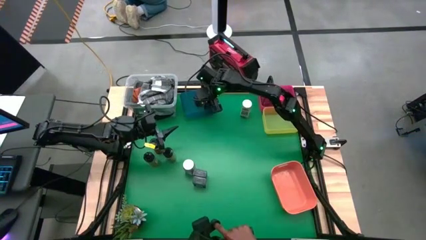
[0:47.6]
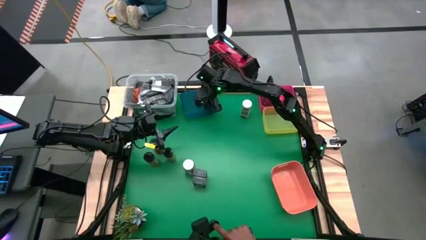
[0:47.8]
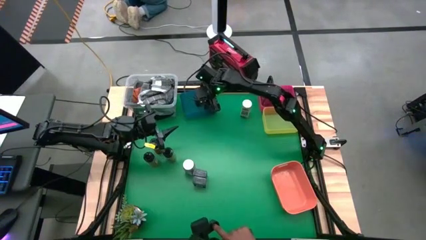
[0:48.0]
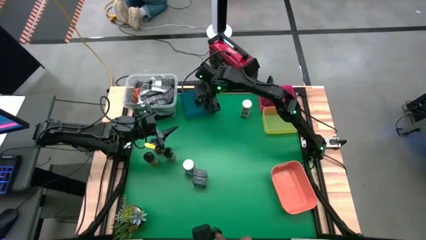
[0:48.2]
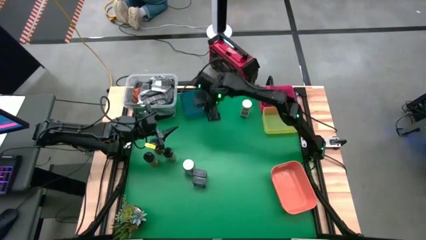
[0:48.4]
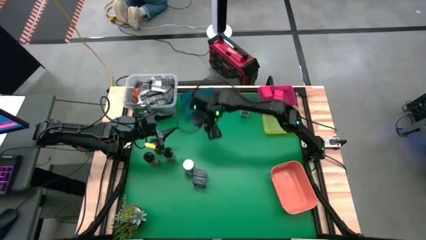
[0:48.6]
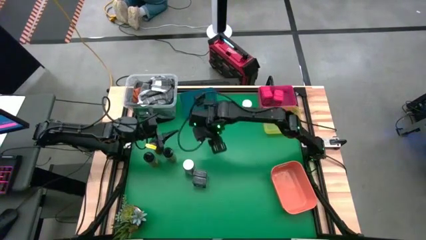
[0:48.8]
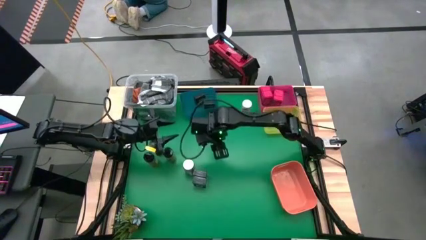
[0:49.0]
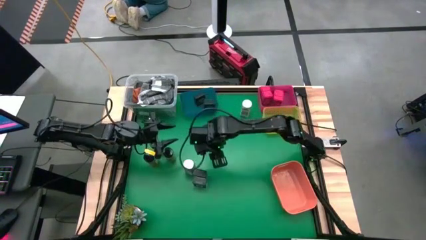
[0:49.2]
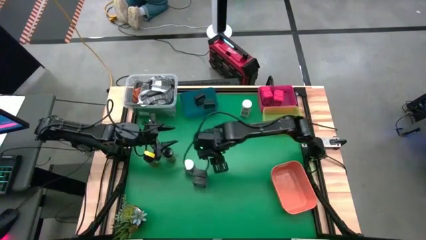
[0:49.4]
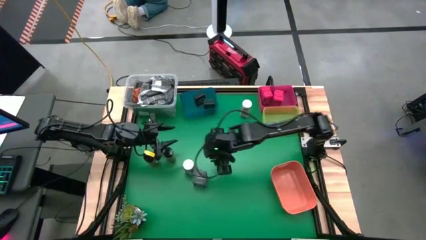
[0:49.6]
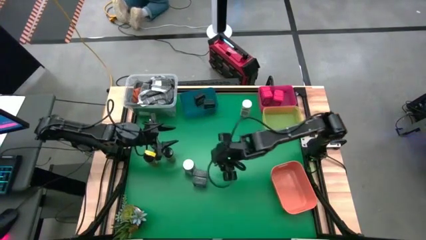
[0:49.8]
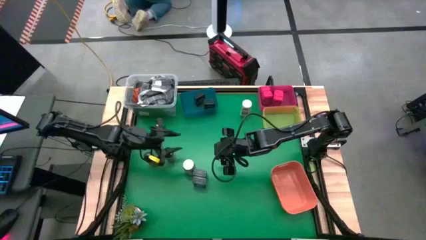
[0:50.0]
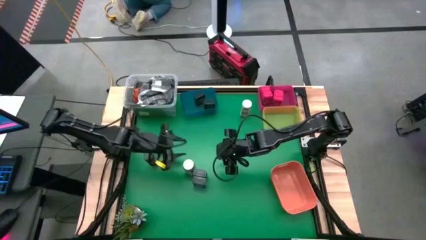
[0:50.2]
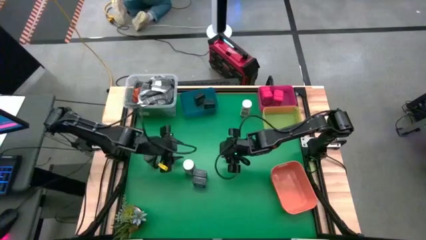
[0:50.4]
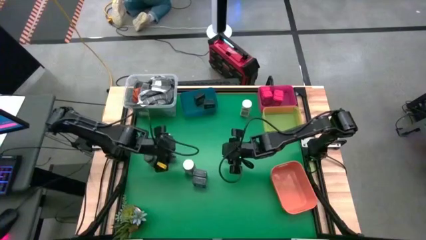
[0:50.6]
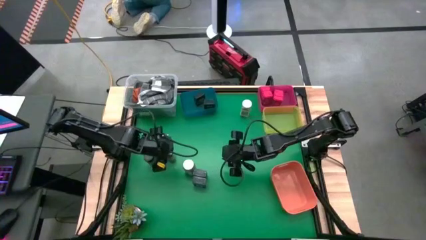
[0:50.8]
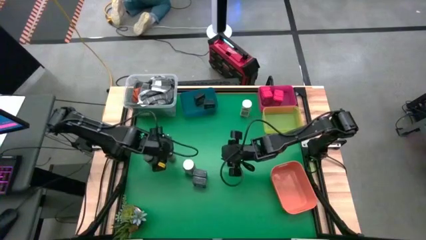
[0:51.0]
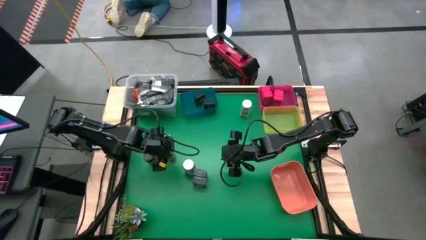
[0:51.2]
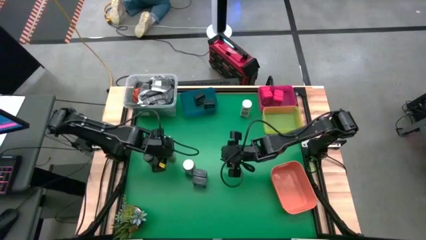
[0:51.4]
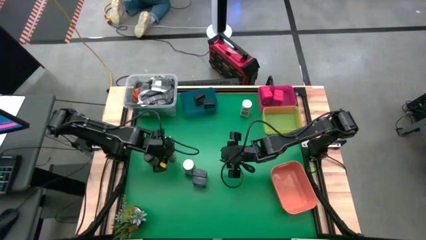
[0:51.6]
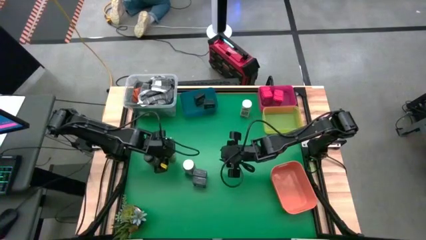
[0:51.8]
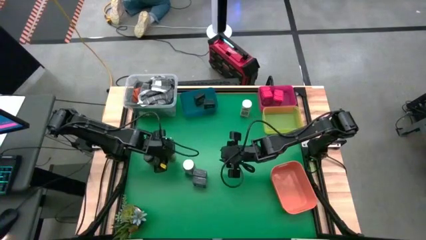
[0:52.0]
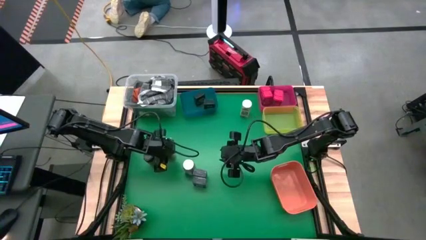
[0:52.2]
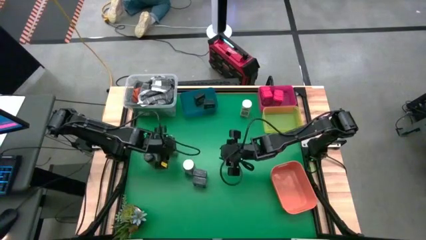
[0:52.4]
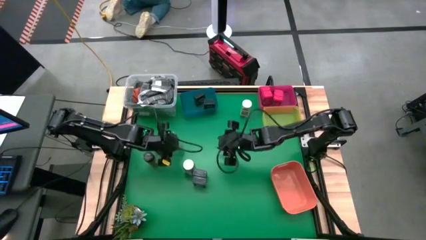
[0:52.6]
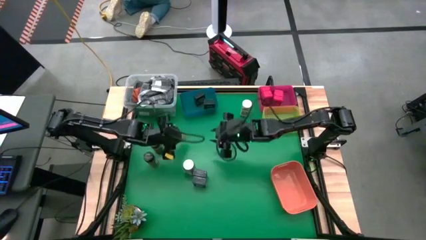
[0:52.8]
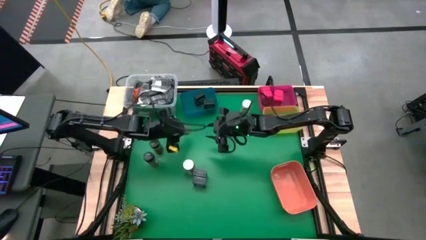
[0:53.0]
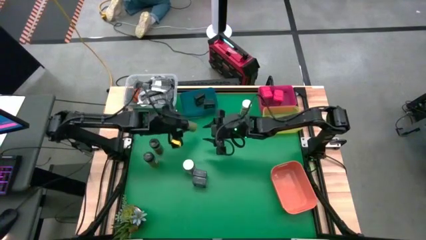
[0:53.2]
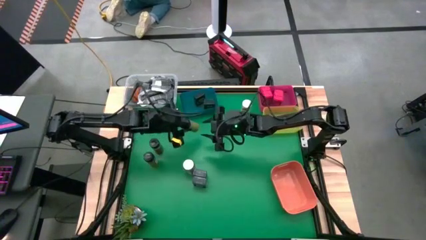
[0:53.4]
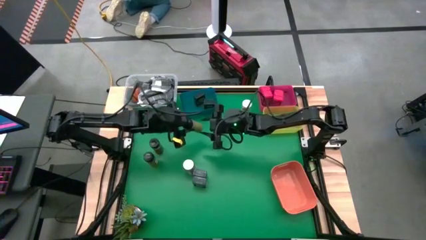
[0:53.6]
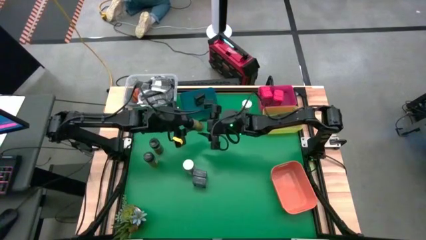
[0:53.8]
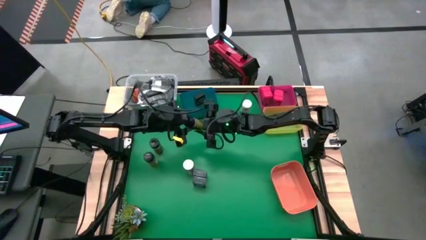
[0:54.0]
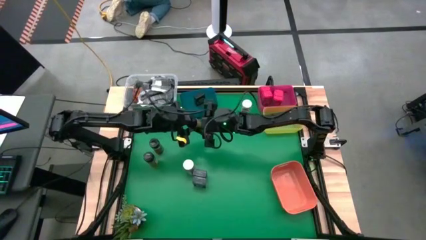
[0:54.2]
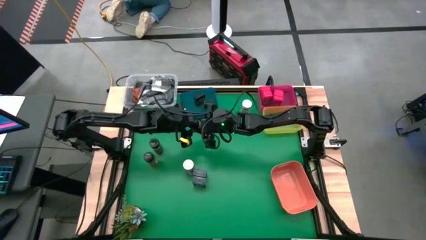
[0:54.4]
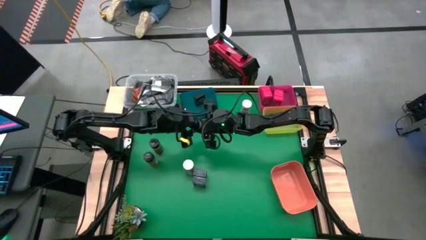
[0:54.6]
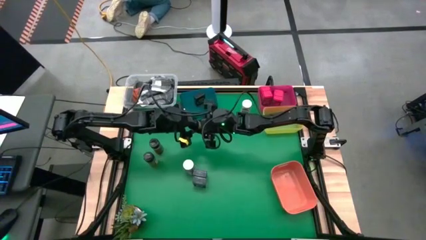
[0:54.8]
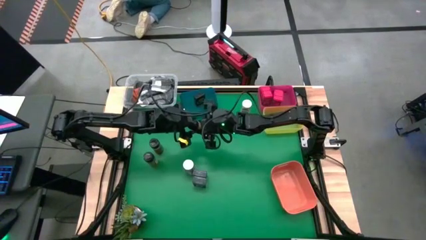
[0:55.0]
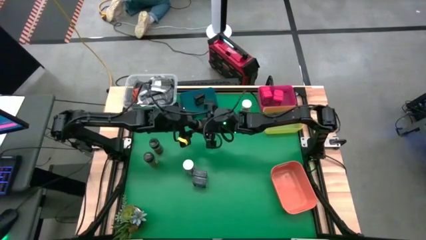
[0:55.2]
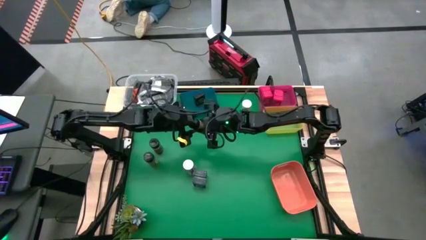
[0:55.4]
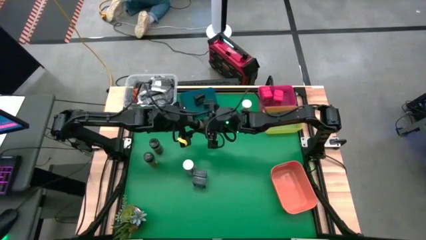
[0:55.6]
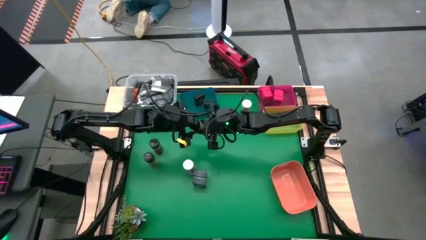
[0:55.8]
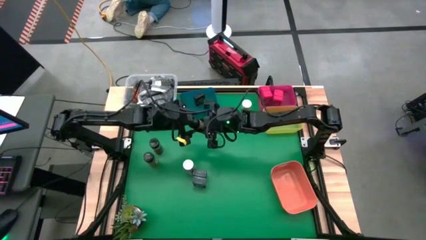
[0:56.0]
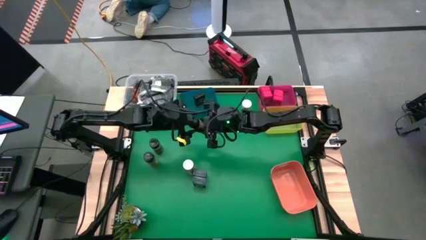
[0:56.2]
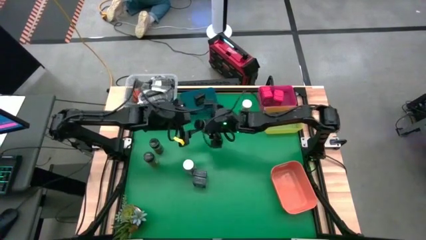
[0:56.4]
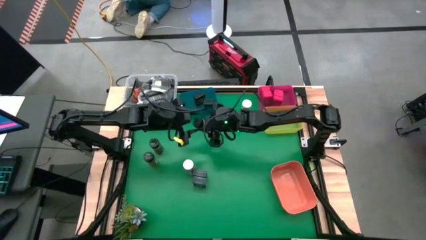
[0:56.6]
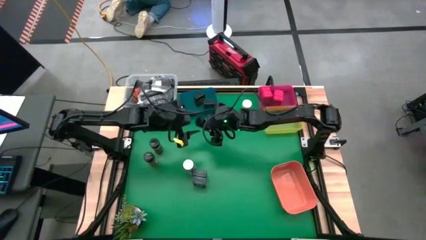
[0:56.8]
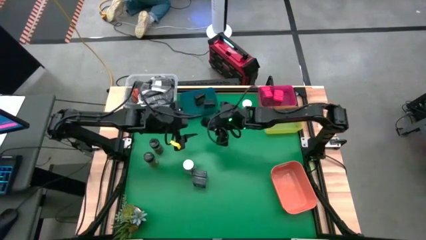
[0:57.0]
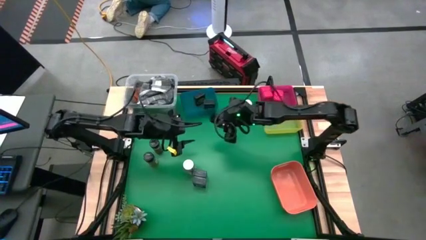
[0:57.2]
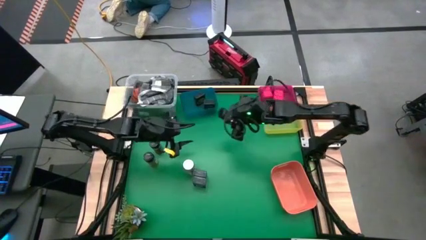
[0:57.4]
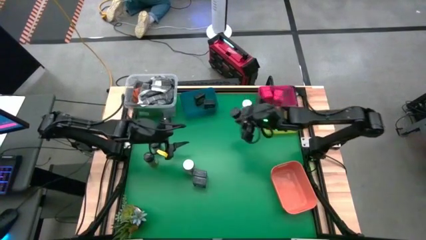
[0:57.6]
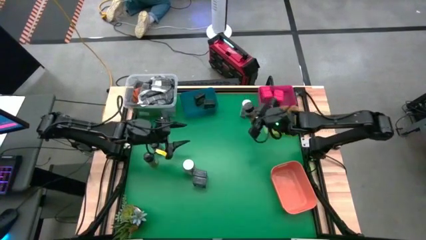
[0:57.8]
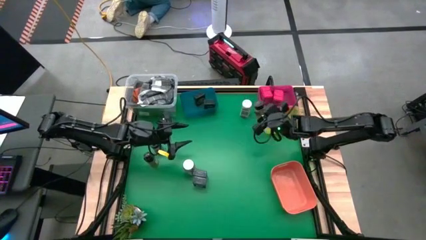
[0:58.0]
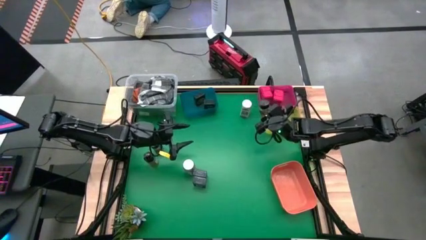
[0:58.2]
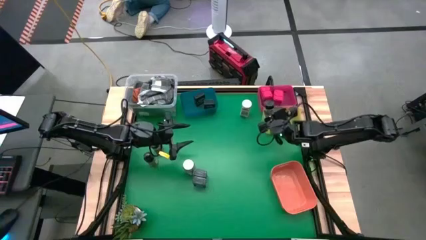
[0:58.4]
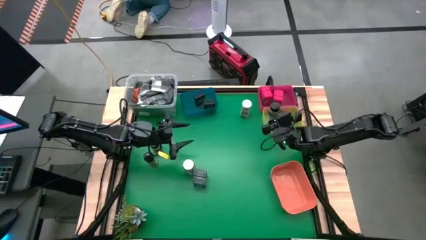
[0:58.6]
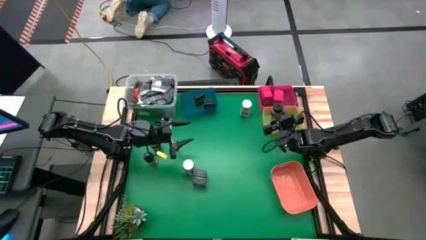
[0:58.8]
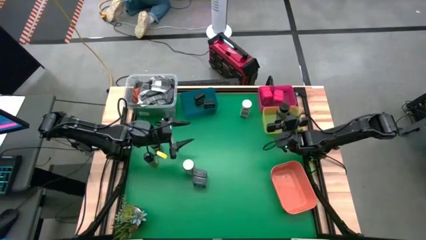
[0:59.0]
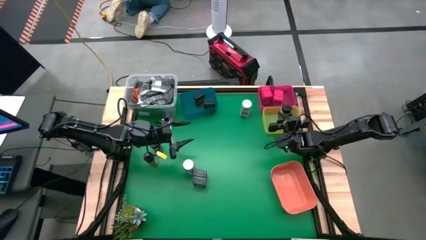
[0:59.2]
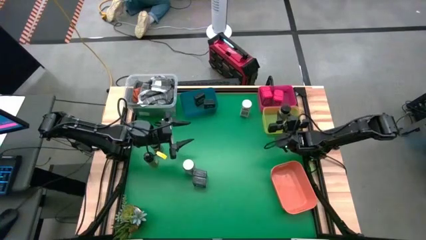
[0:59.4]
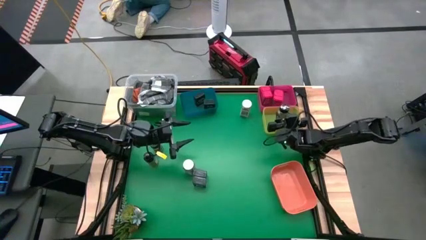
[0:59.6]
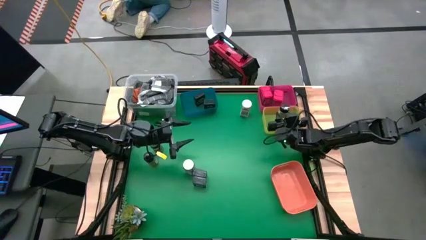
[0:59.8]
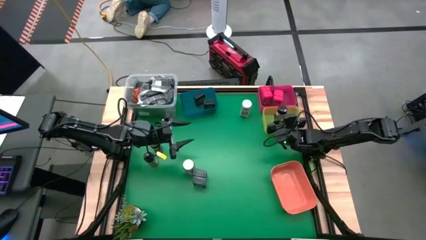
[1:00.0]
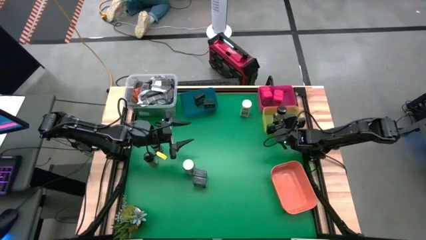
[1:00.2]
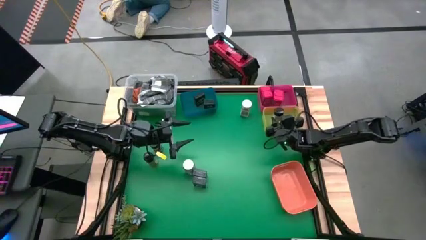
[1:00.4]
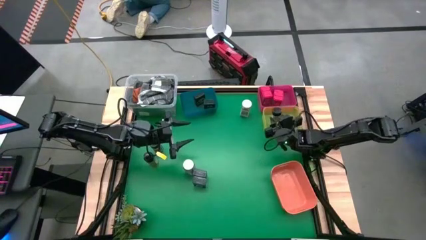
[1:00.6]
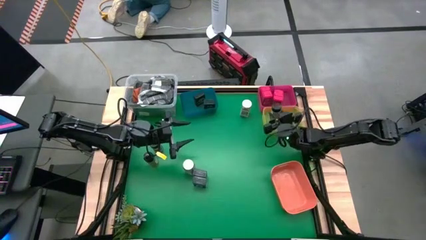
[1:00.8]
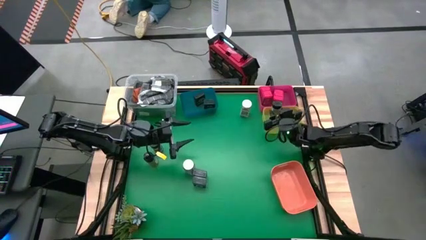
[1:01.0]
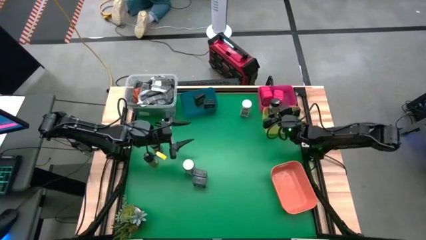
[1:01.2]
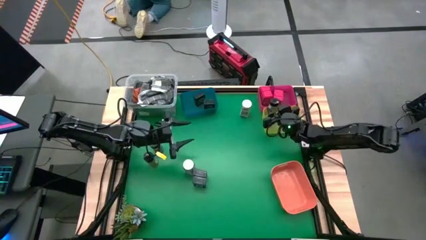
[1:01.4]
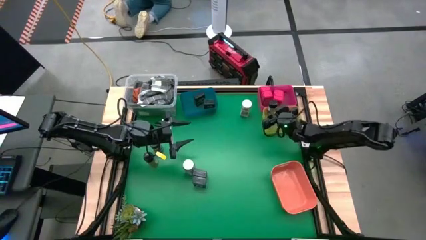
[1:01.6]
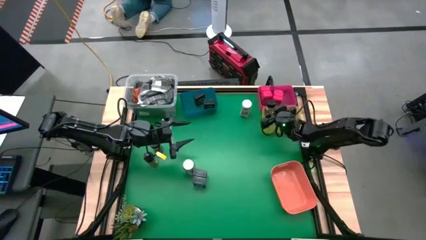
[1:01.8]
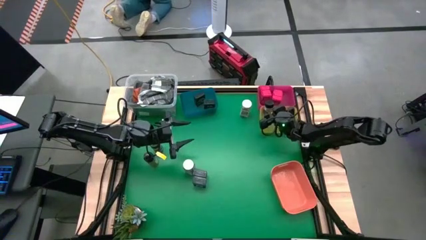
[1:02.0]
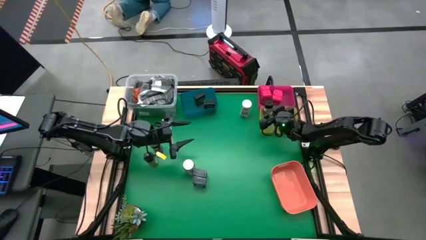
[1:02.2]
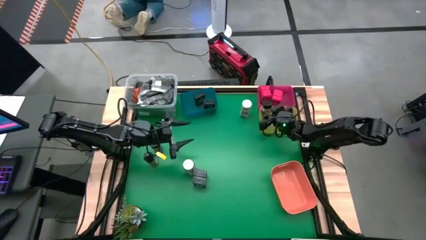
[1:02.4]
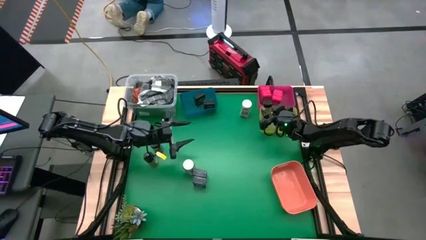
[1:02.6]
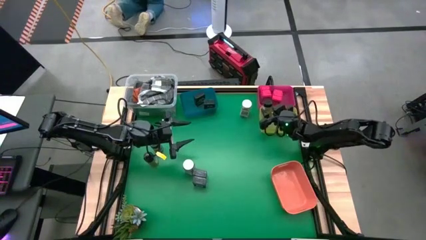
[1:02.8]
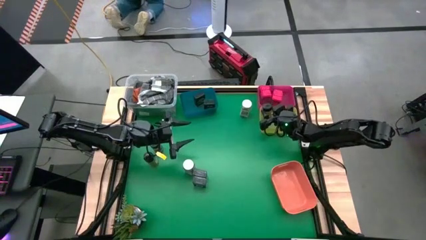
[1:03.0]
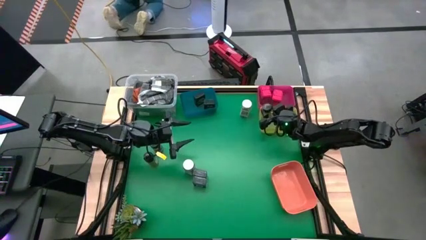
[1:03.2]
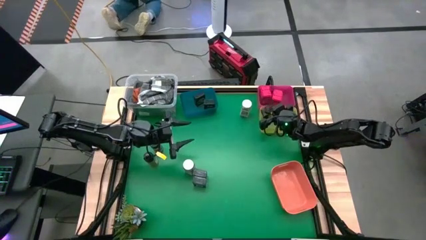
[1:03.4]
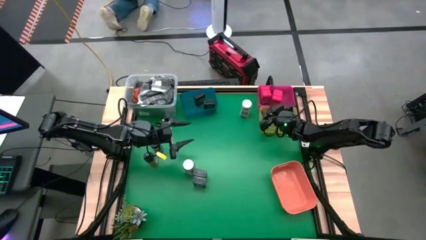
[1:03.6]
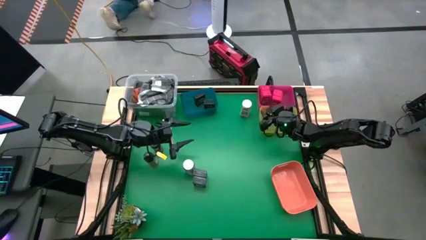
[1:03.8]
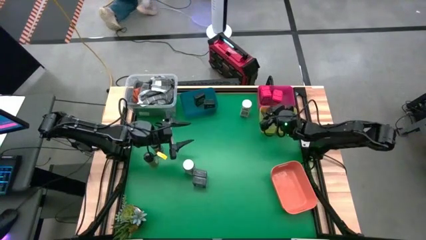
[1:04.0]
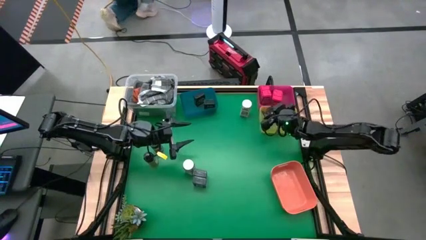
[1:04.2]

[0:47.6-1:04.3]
Task: Sort spices by type
Put the black seasoning from the middle left into the yellow bin
